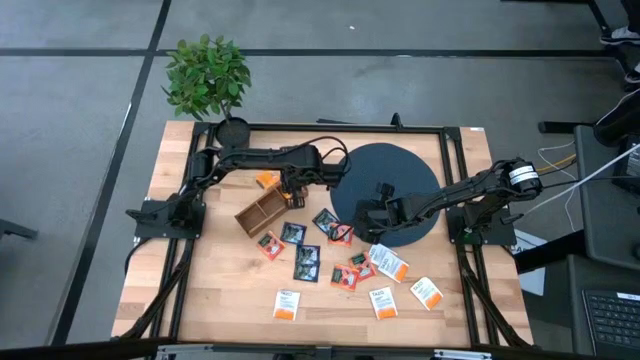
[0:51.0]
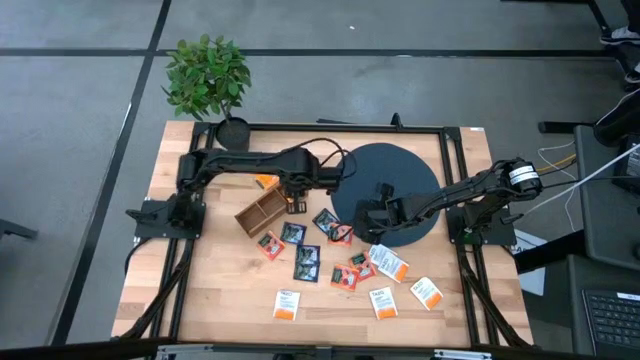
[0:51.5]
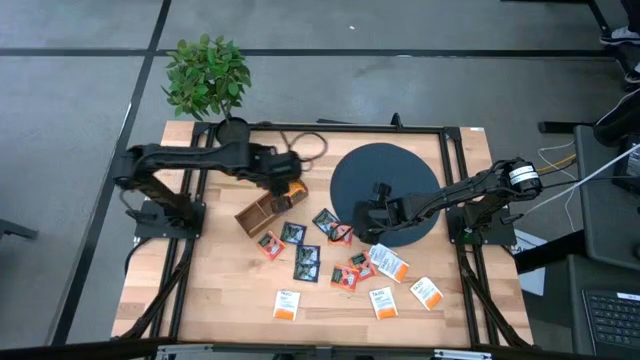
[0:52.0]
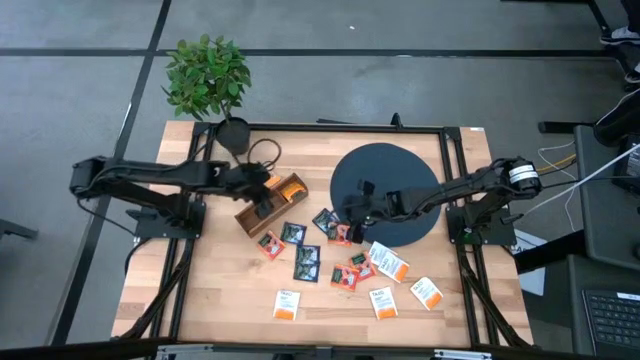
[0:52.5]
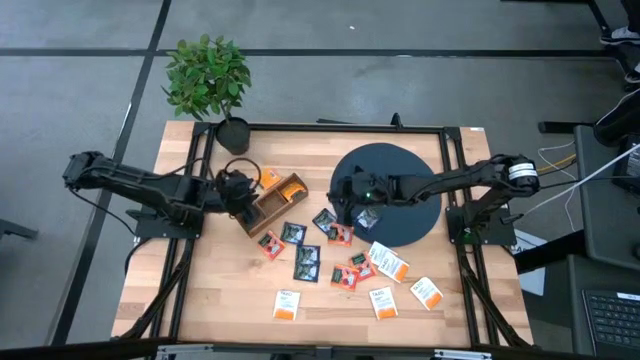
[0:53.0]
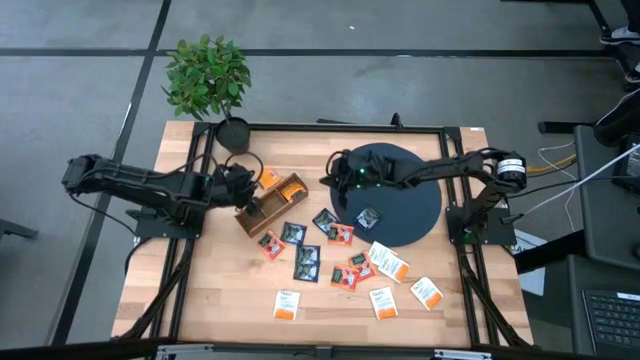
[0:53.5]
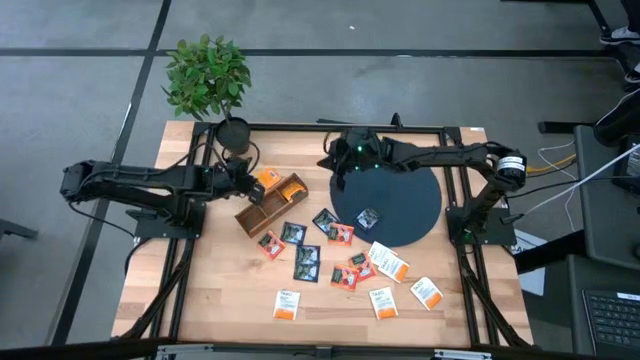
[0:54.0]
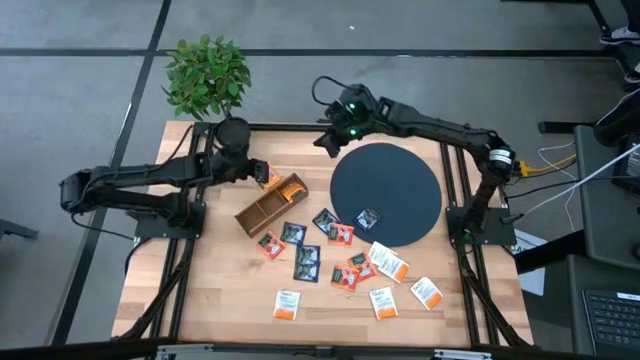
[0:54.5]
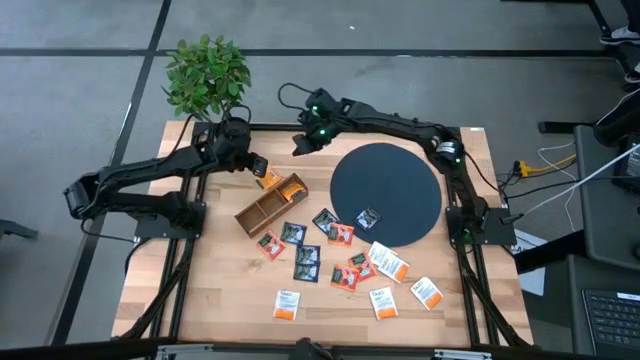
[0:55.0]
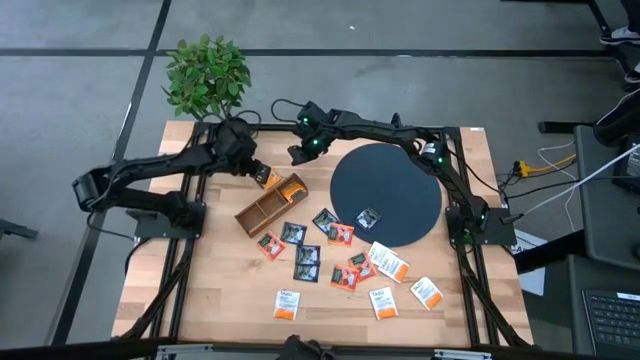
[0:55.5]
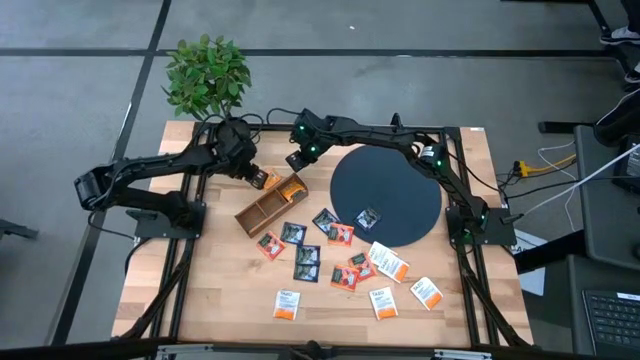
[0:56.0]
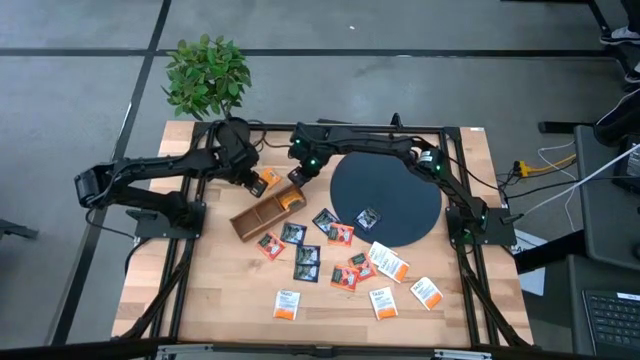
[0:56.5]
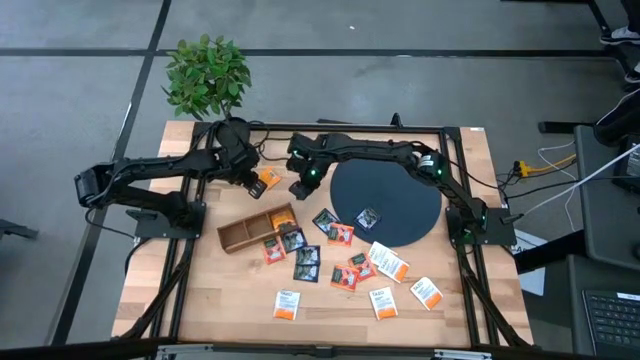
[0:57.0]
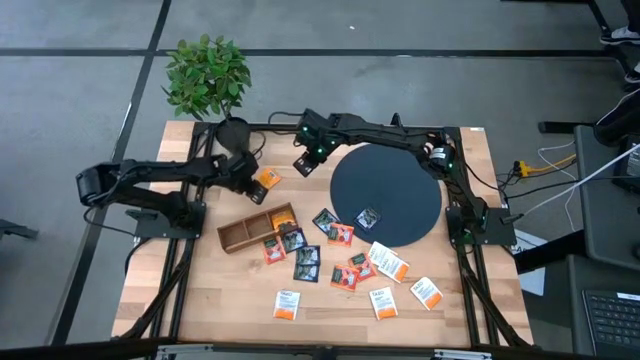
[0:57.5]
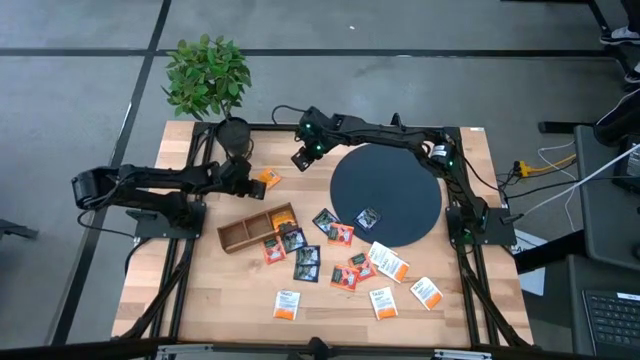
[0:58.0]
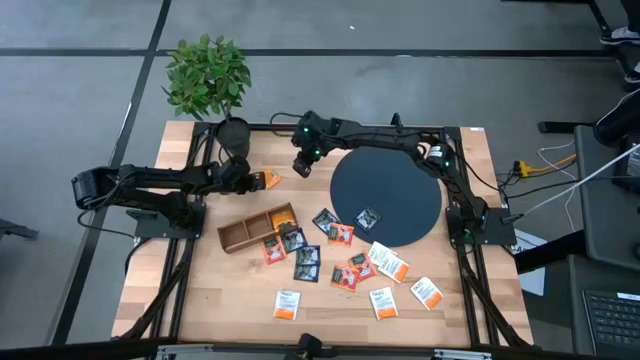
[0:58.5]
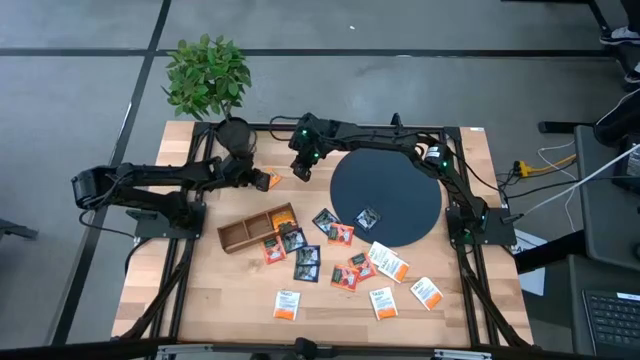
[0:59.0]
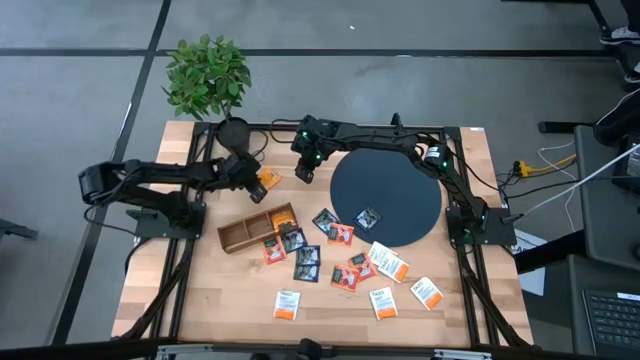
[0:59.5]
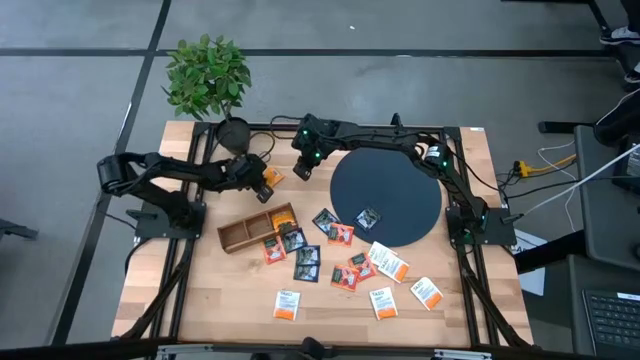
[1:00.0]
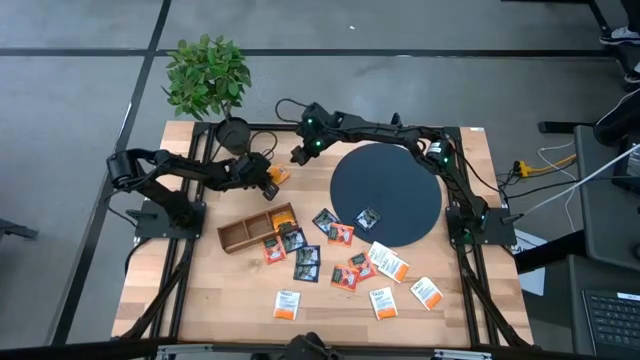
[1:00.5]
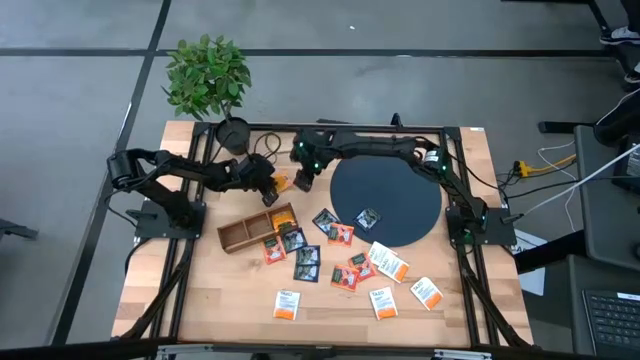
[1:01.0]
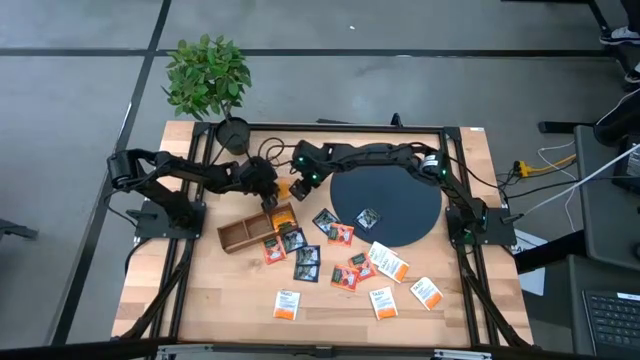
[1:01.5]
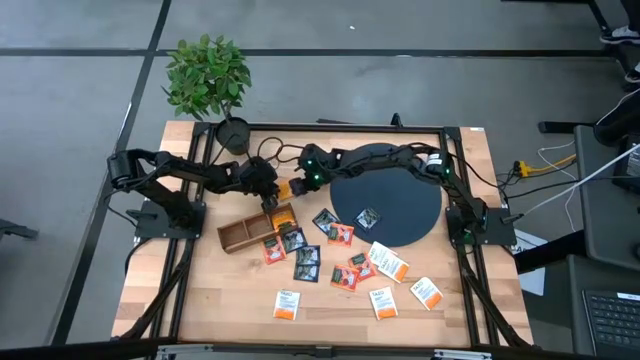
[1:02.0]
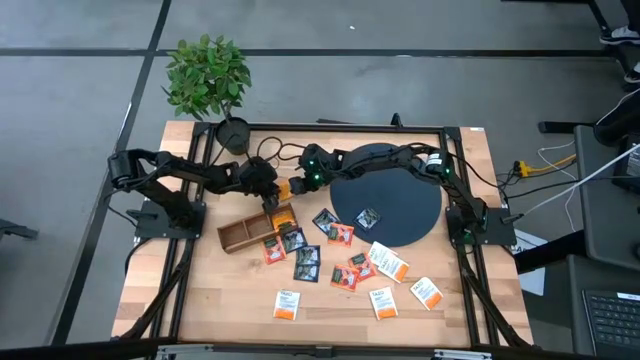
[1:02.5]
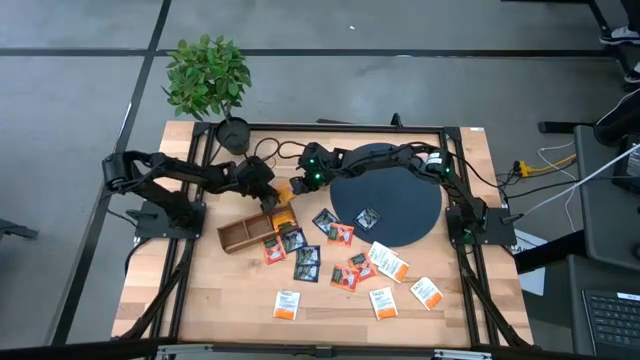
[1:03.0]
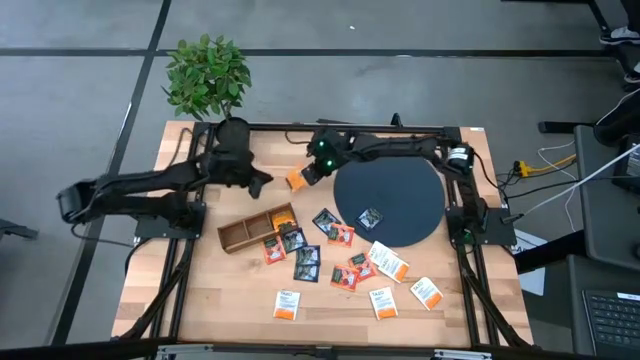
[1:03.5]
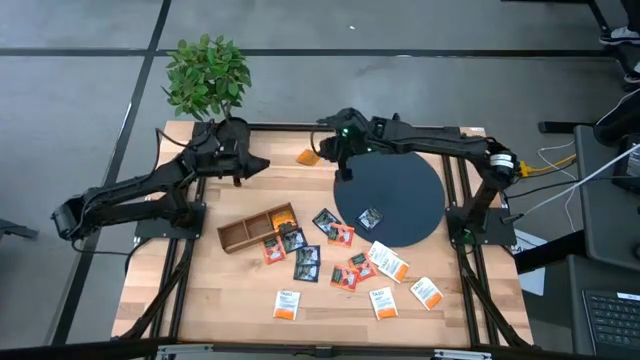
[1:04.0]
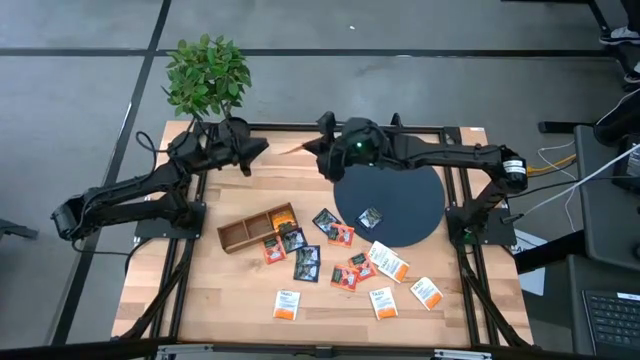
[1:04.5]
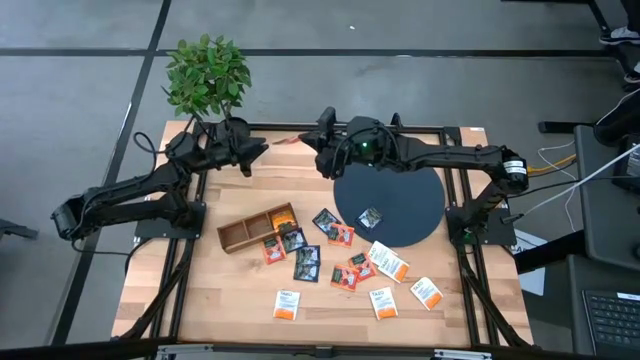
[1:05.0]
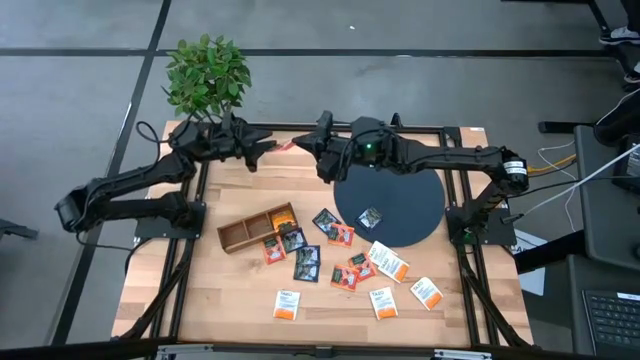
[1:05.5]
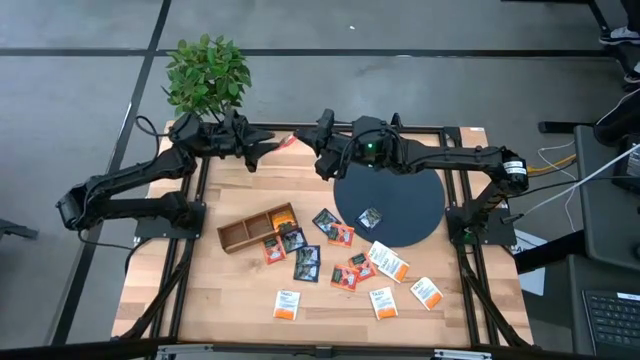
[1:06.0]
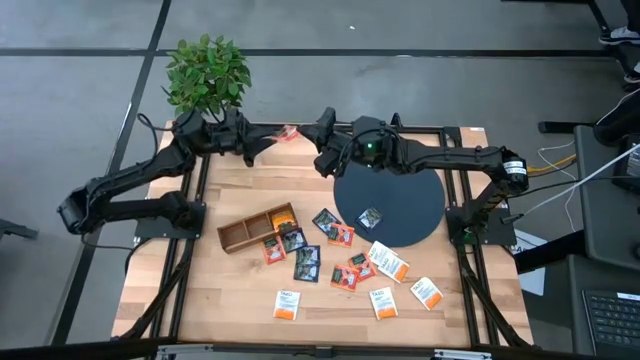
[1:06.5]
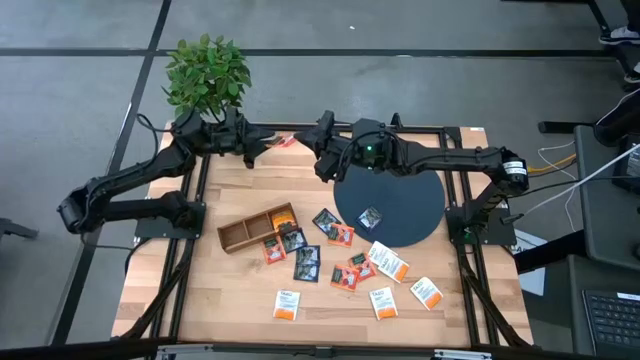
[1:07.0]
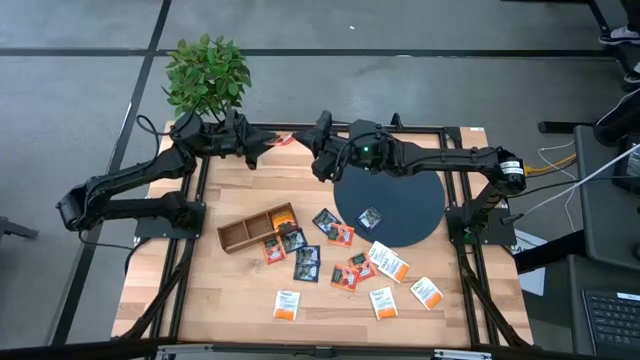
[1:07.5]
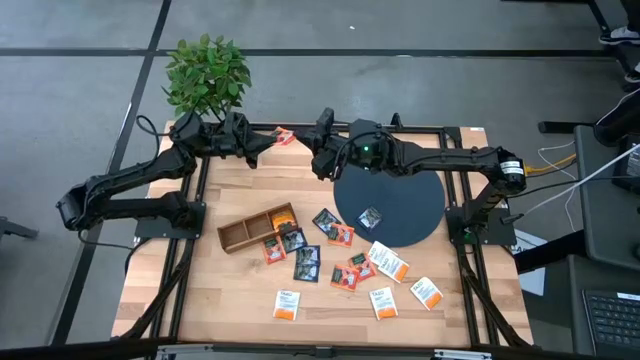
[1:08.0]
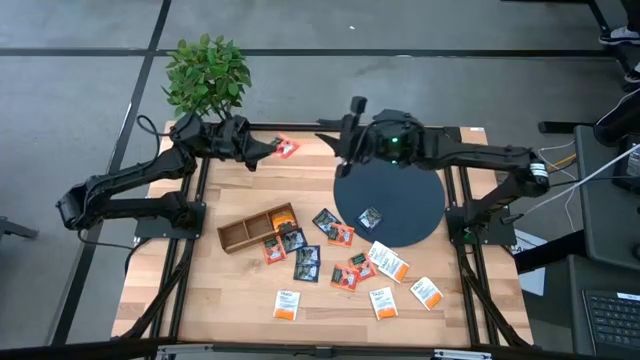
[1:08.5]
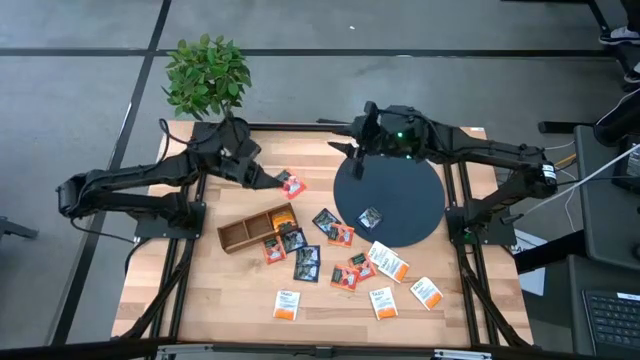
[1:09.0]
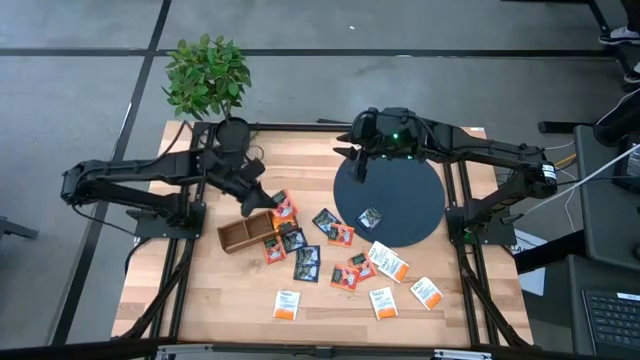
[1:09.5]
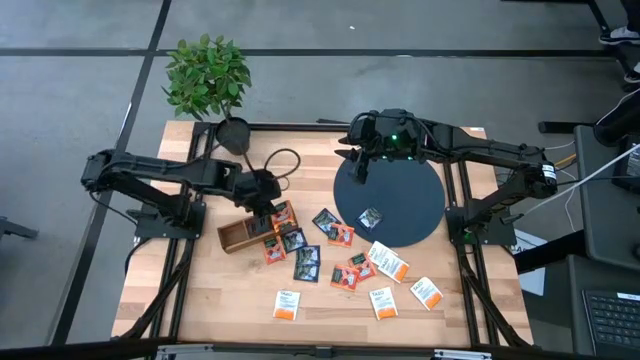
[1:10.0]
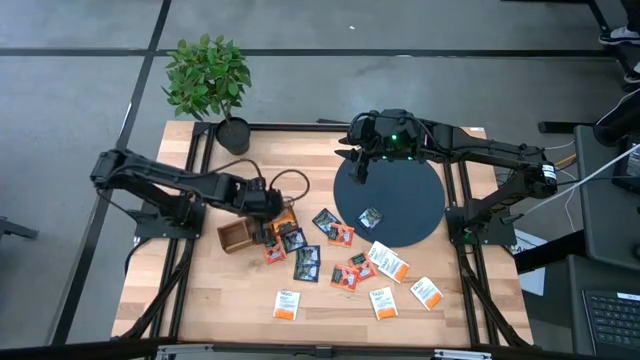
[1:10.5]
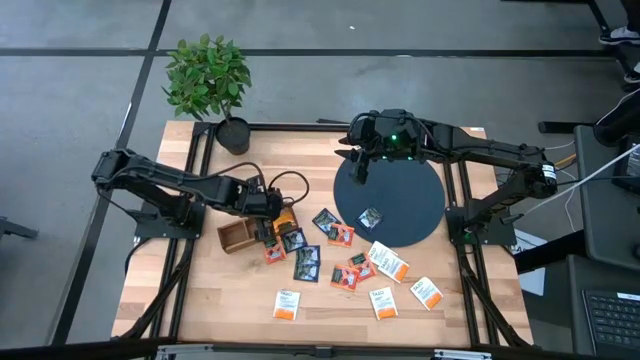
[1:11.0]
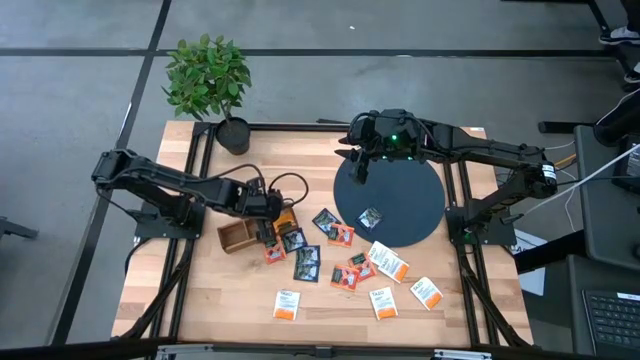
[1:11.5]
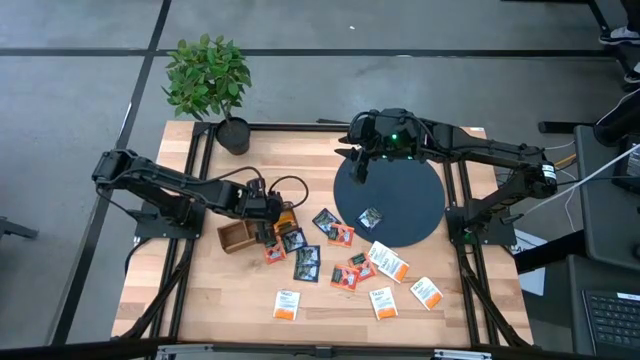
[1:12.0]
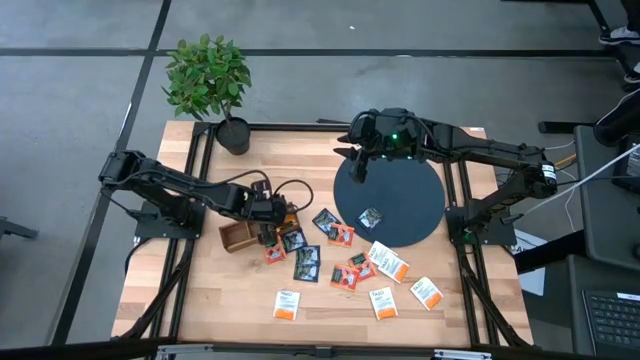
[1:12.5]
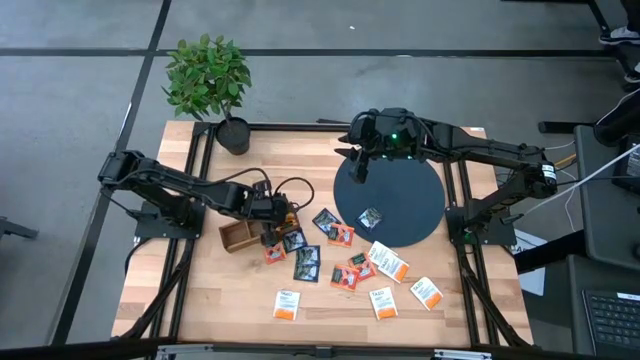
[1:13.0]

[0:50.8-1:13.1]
Task: Pick & Place Tea
Put the orange tea bag into the right section of the wooden organizer

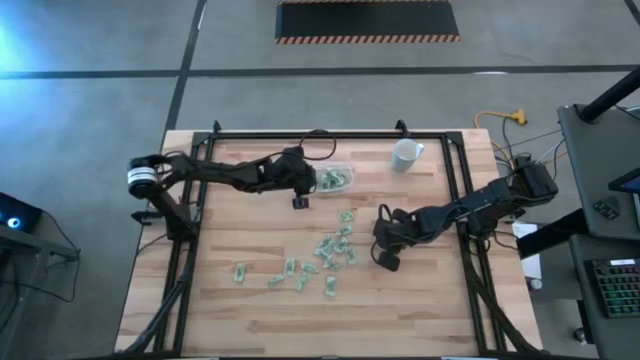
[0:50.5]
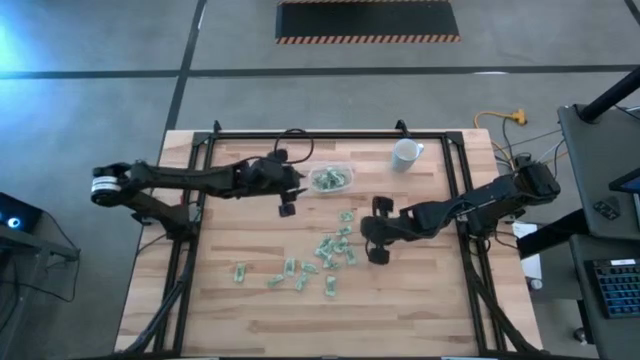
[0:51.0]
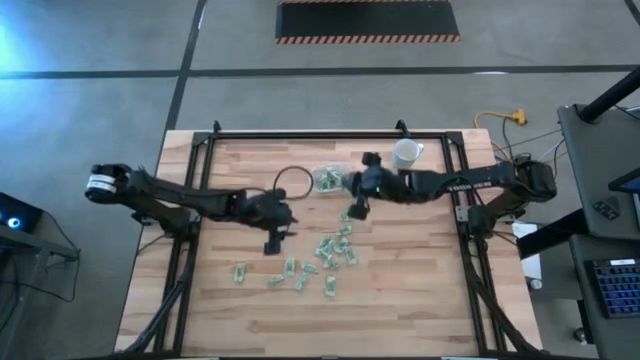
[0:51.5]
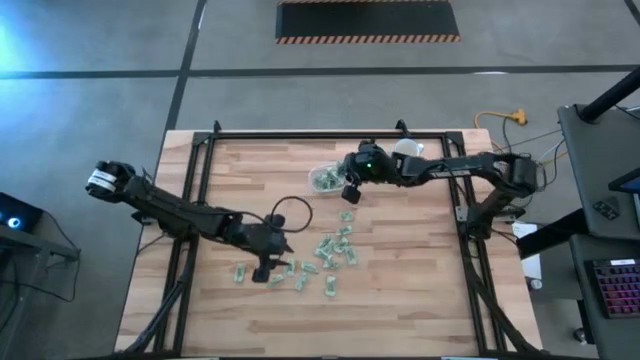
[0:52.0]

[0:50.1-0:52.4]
Task: Pick and place Stevia / Truvia into bins
Put the stevia packet into the transparent container
